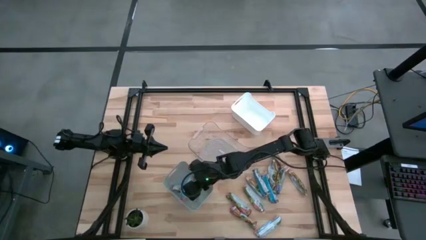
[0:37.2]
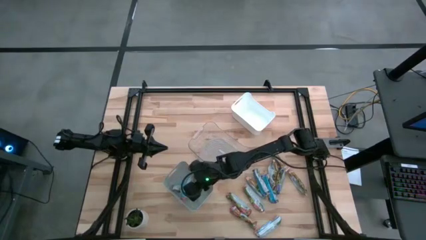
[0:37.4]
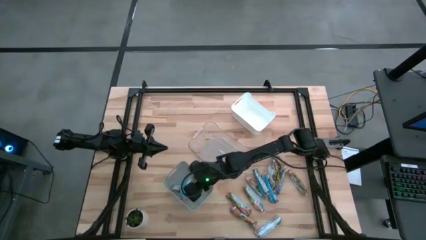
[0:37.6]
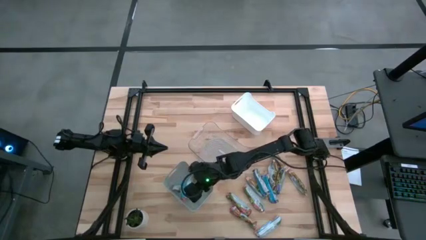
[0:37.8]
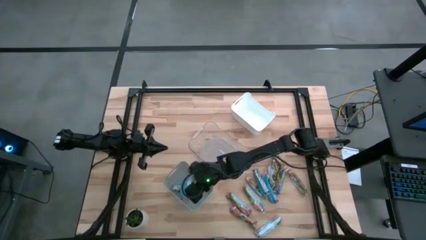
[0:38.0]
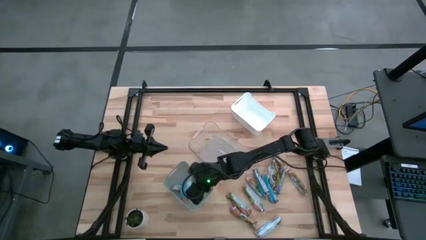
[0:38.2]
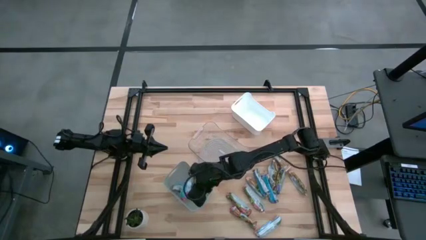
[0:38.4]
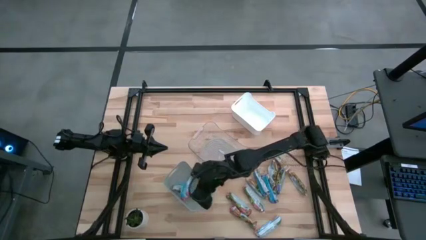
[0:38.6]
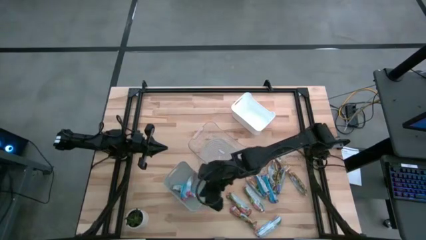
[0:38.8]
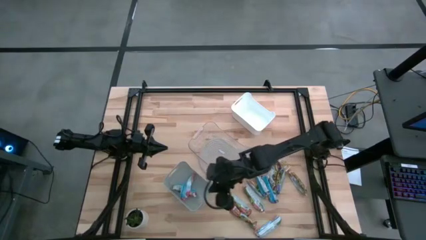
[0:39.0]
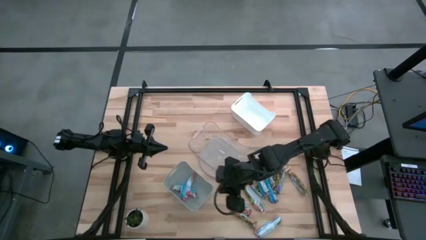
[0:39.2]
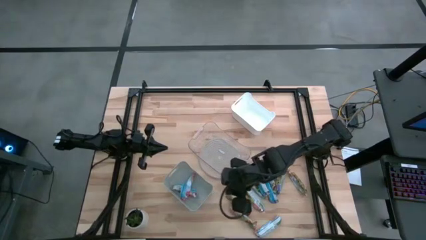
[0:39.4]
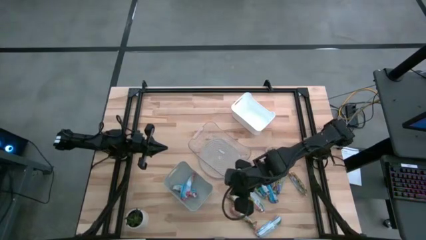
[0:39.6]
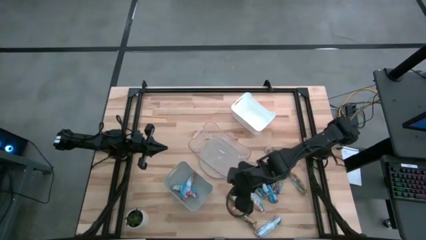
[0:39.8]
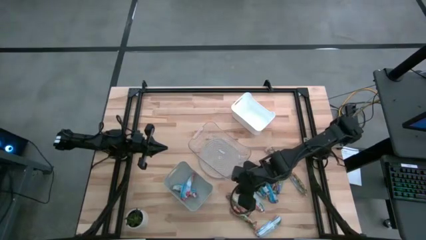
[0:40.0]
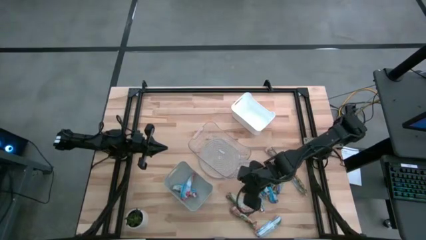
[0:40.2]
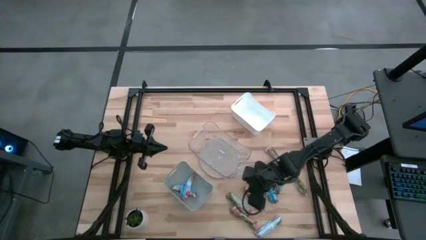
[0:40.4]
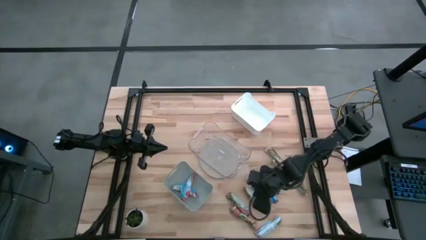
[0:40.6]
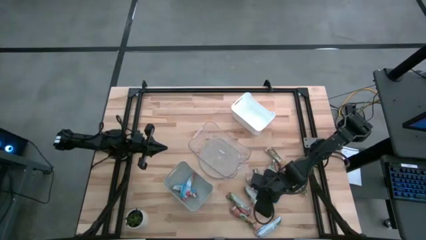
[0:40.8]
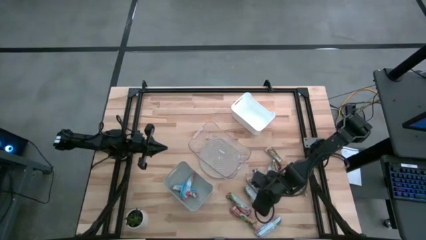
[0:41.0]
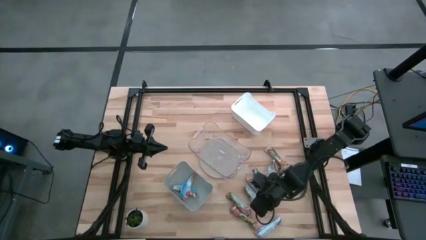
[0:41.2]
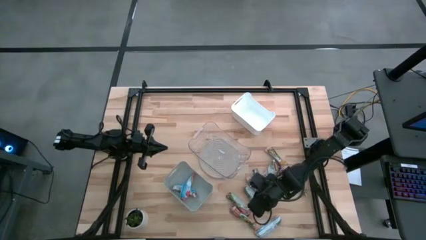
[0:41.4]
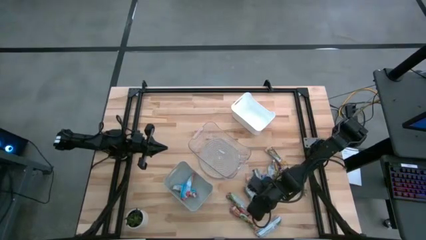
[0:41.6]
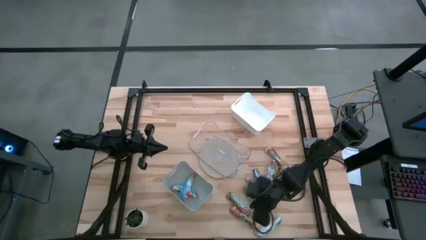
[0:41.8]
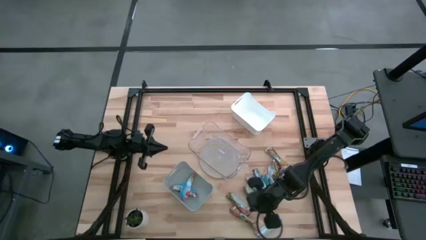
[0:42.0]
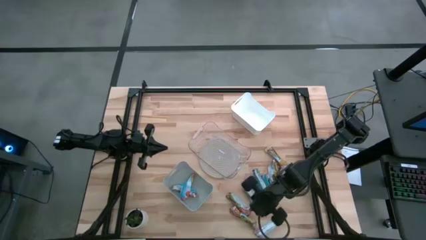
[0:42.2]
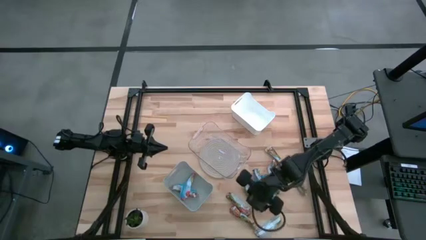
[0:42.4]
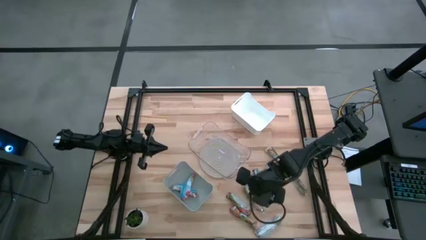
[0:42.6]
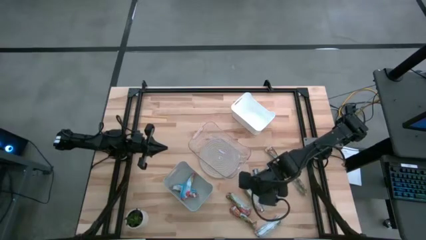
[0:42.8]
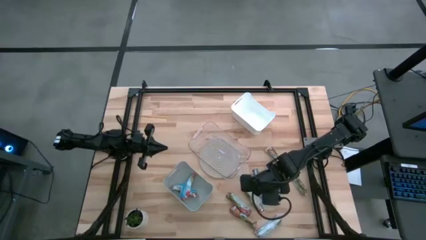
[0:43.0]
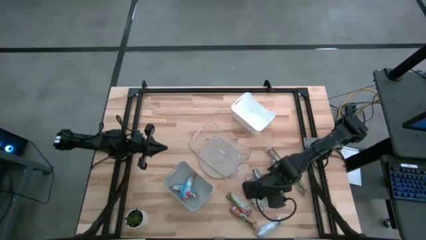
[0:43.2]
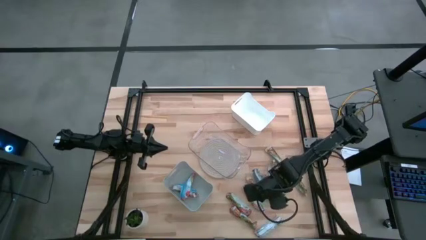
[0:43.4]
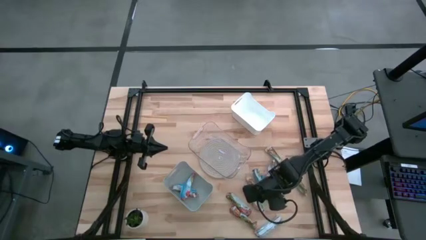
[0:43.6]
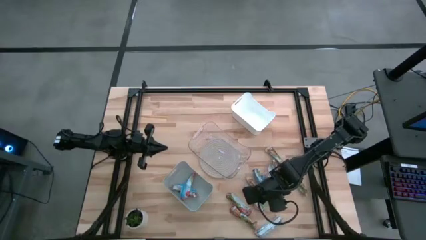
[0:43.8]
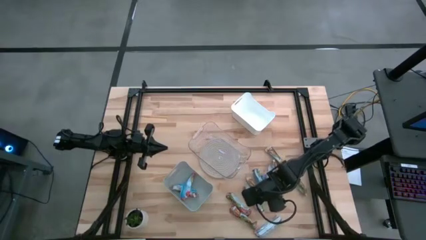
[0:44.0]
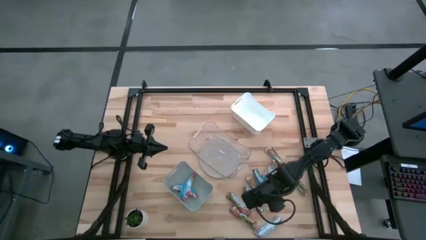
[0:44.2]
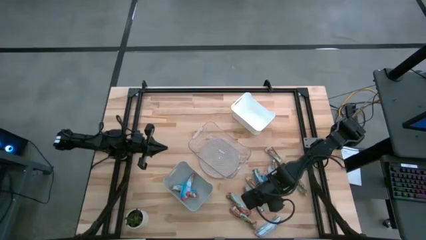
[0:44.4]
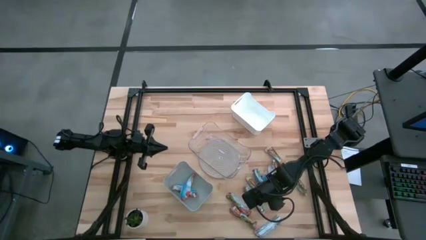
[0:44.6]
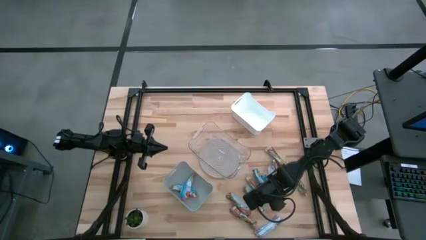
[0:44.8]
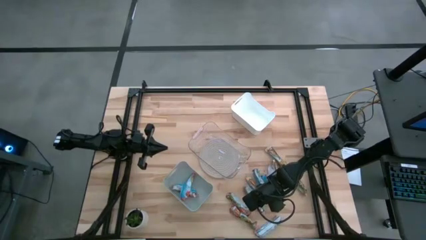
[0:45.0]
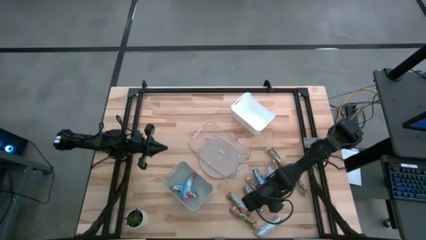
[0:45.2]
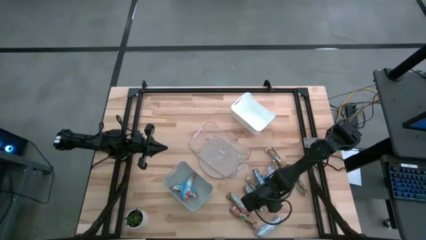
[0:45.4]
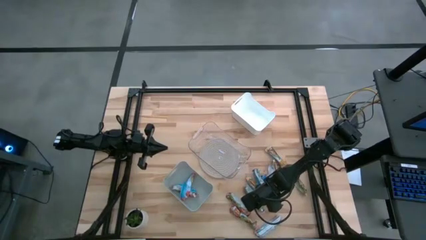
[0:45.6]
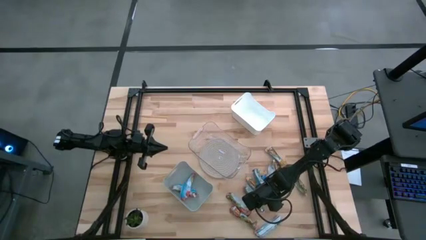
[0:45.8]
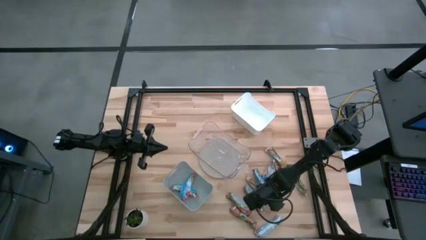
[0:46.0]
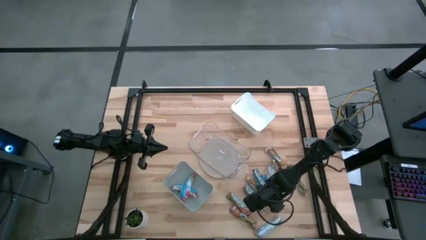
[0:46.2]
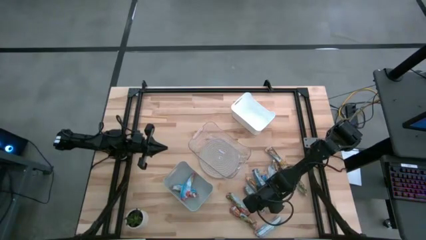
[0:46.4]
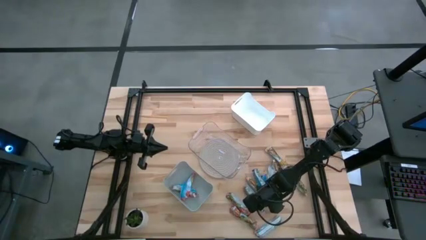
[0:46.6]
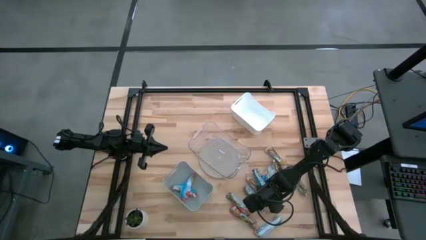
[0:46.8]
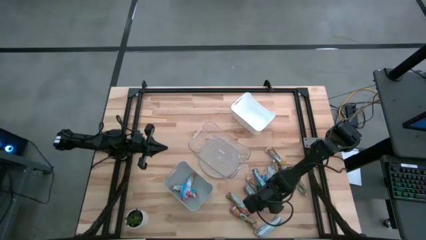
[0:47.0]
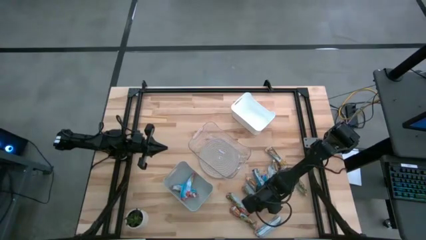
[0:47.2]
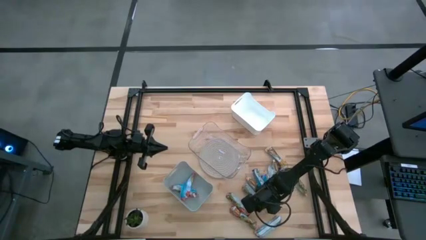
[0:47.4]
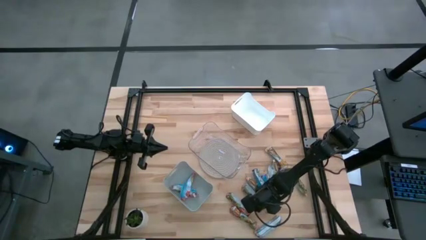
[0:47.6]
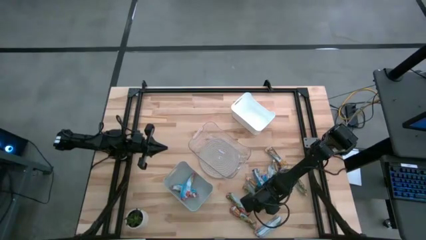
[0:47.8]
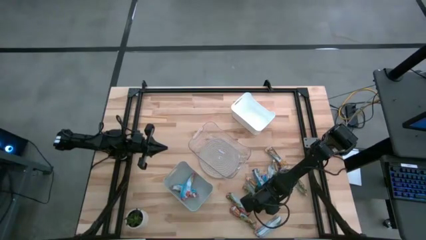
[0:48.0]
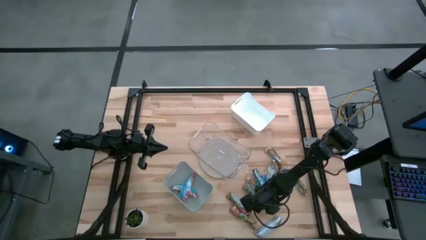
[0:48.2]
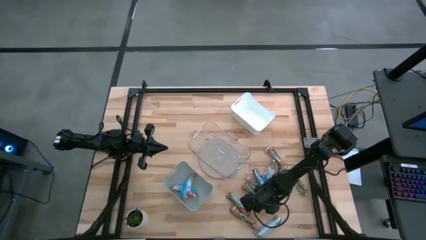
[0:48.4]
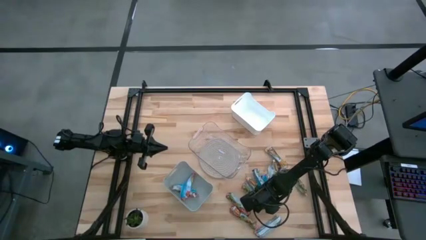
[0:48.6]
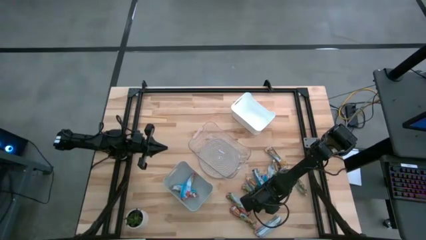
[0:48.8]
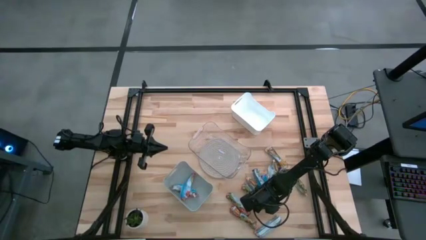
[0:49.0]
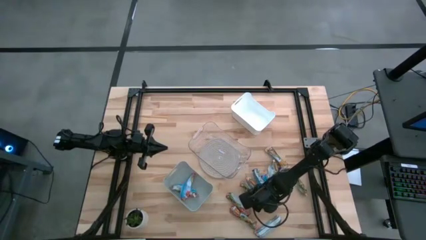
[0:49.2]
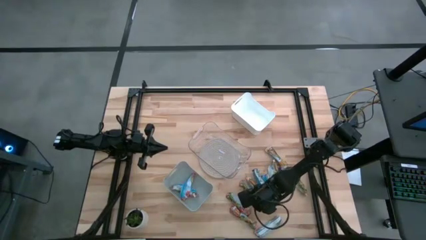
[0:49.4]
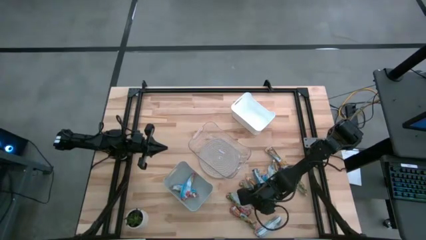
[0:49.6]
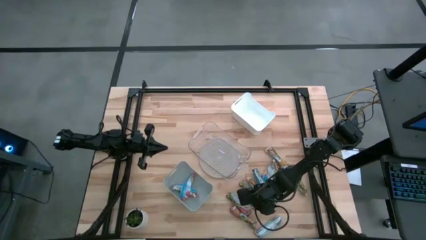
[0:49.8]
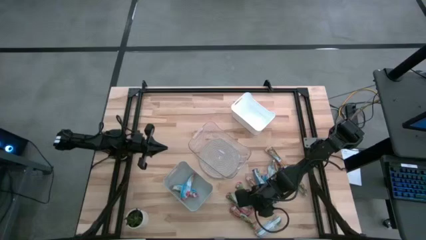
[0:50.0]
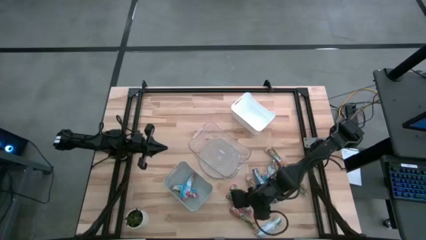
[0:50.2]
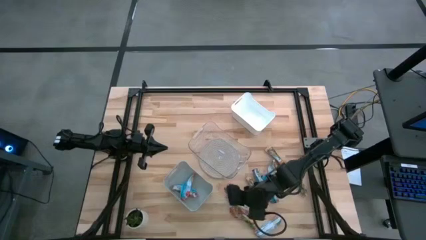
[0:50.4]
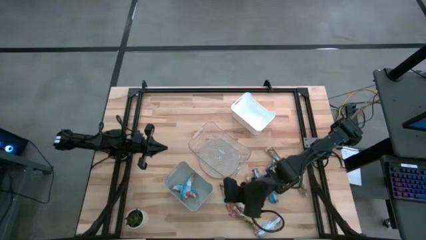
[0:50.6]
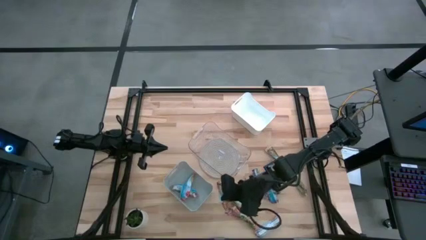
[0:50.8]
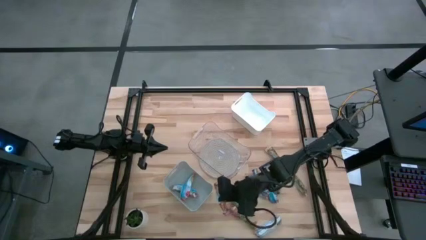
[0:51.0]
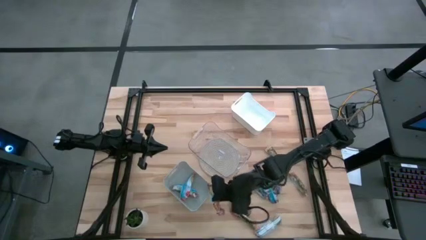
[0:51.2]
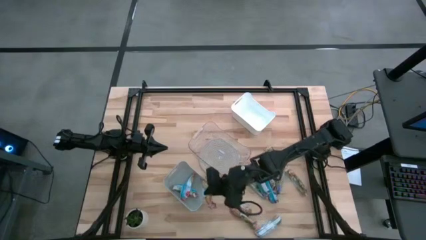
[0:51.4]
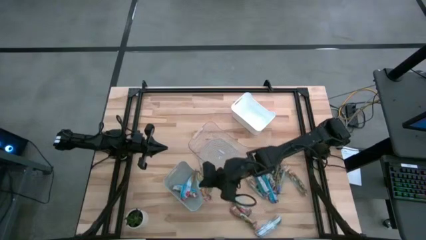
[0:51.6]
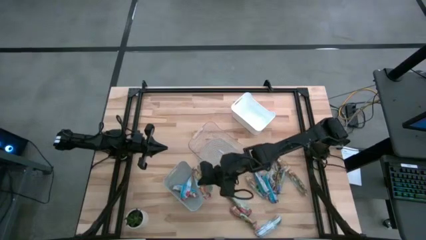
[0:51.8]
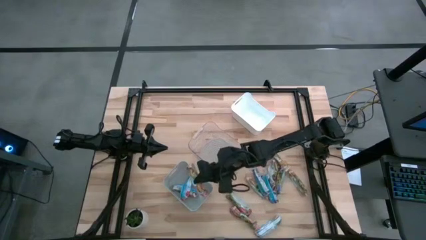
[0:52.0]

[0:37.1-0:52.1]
Task: Pick and place Granola Bars by type
Put the red granola bar into the gray bin
